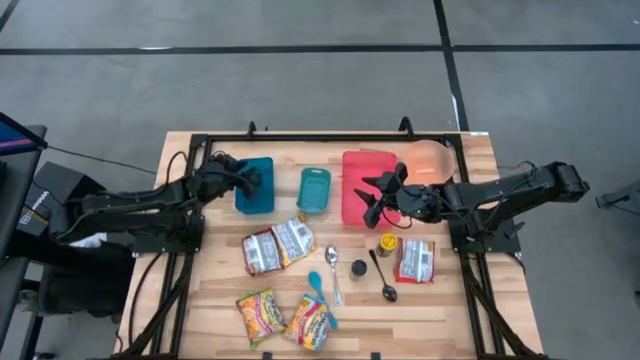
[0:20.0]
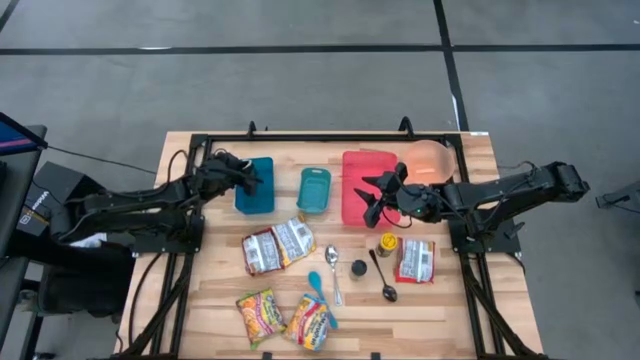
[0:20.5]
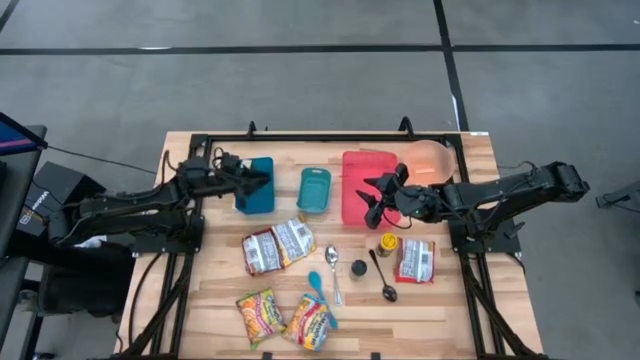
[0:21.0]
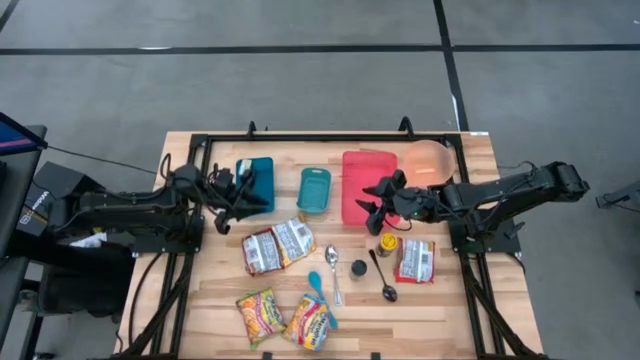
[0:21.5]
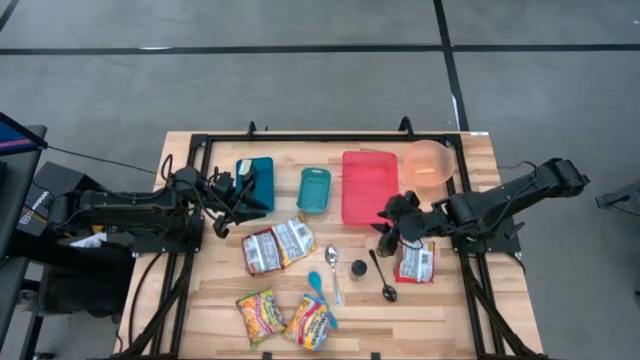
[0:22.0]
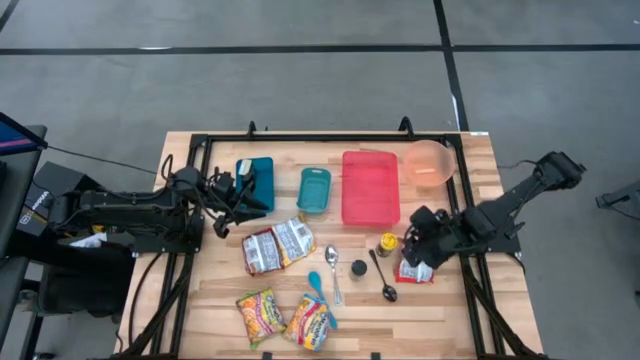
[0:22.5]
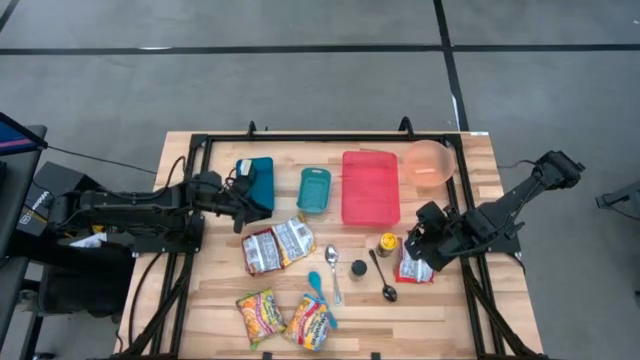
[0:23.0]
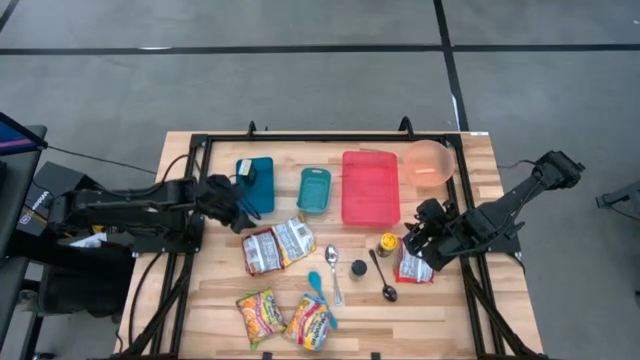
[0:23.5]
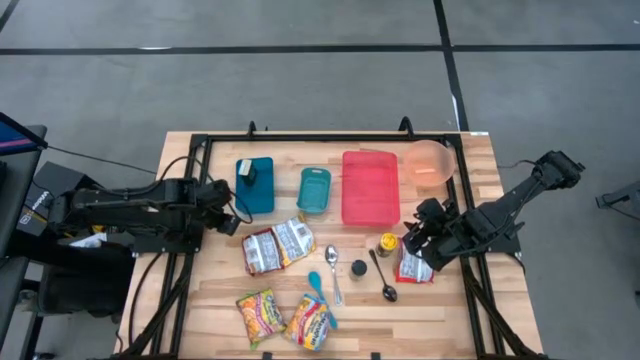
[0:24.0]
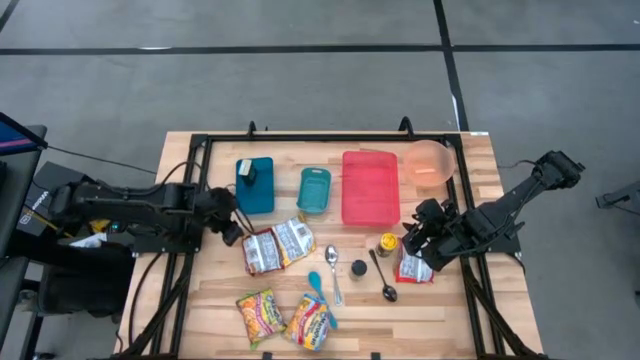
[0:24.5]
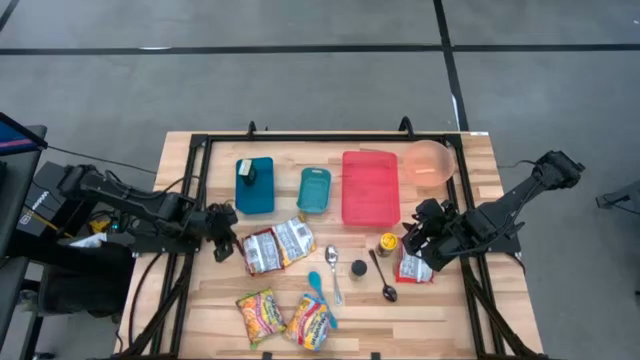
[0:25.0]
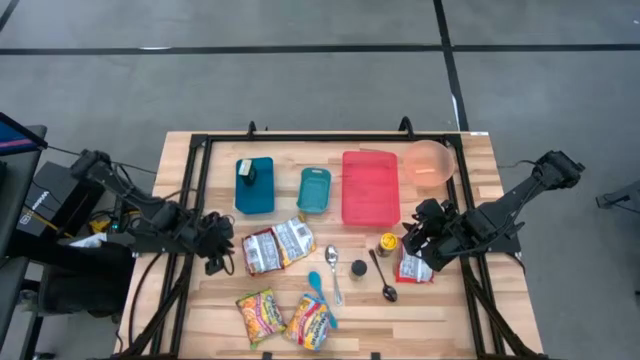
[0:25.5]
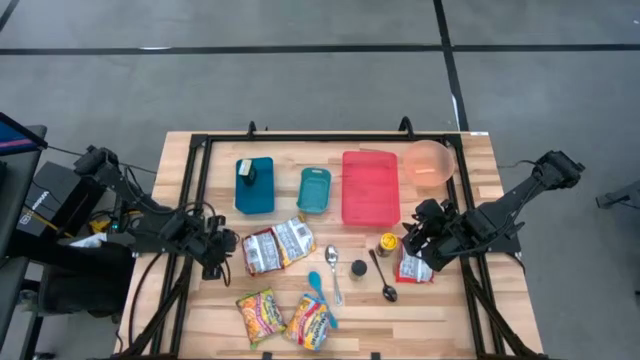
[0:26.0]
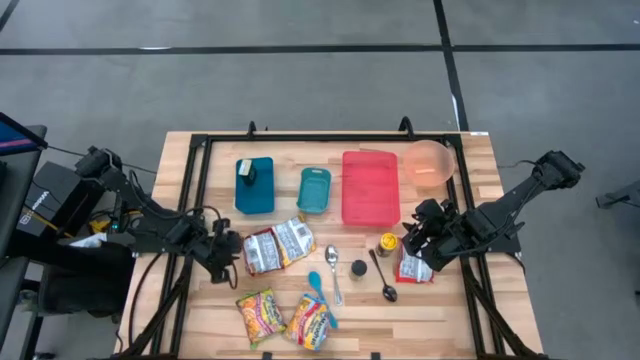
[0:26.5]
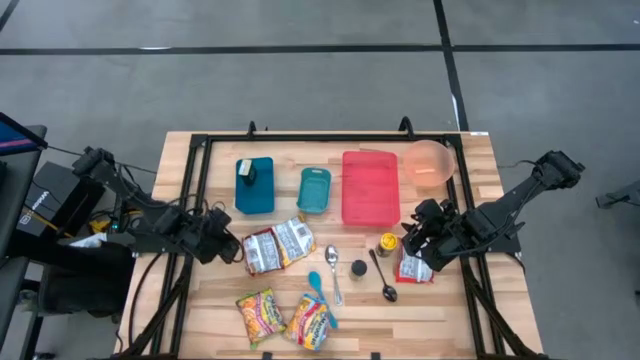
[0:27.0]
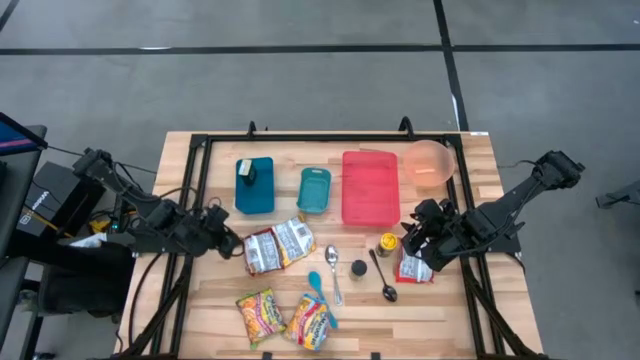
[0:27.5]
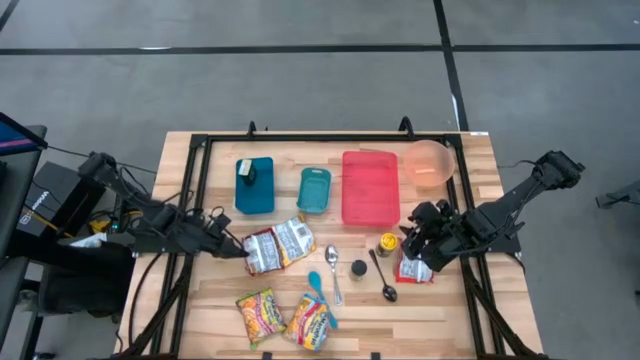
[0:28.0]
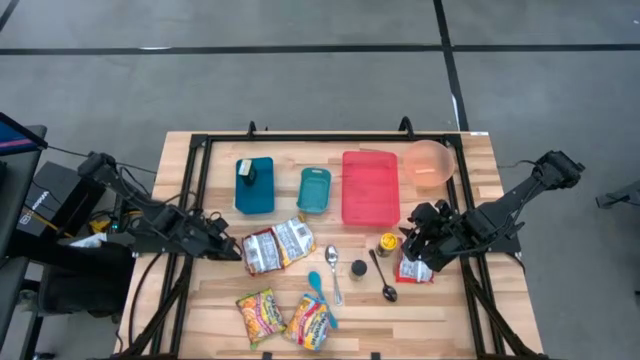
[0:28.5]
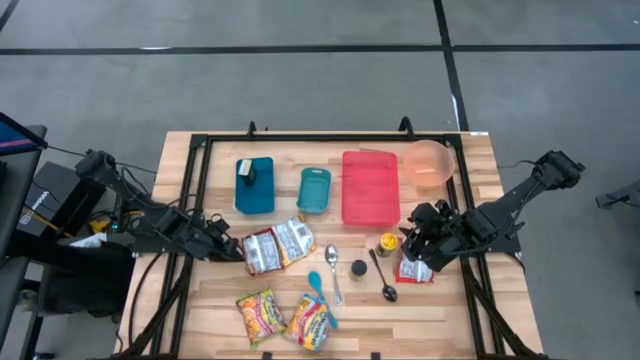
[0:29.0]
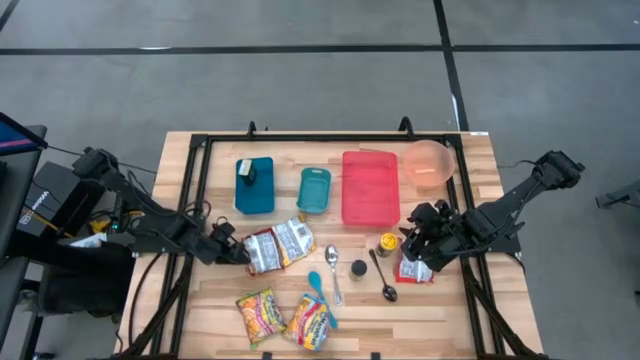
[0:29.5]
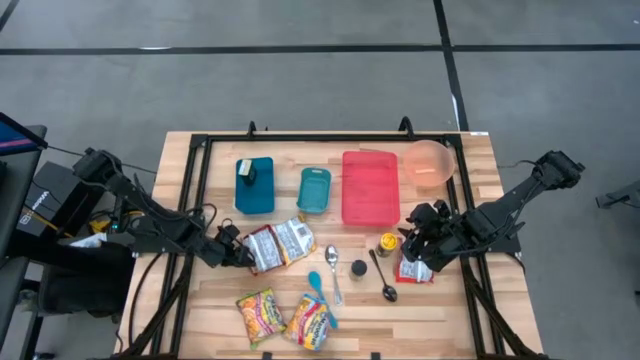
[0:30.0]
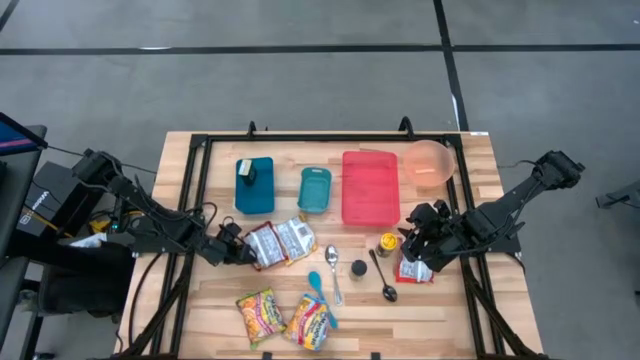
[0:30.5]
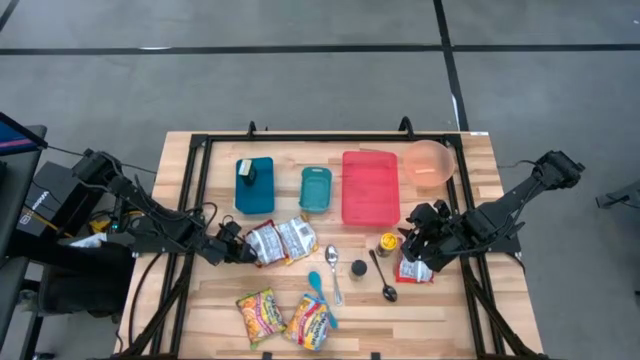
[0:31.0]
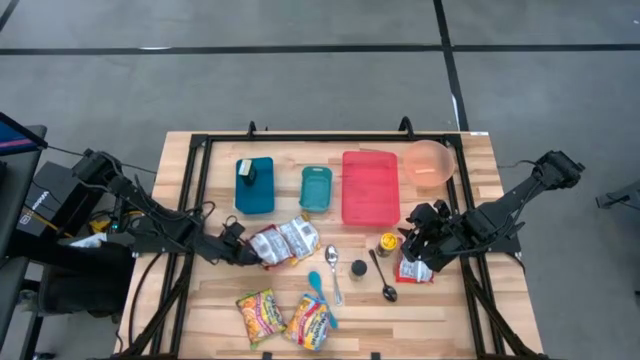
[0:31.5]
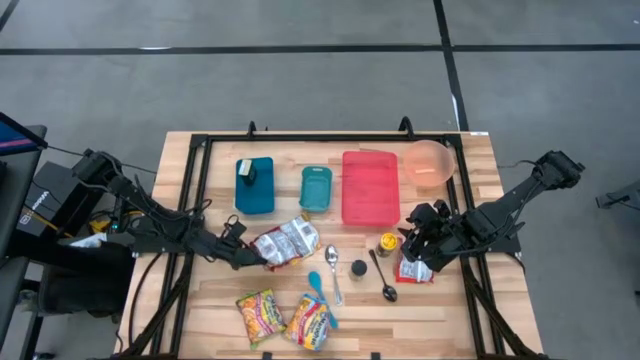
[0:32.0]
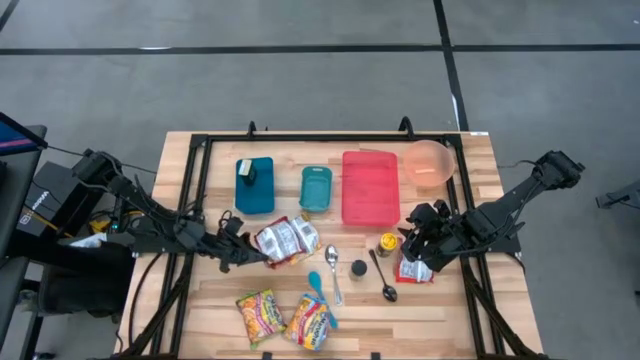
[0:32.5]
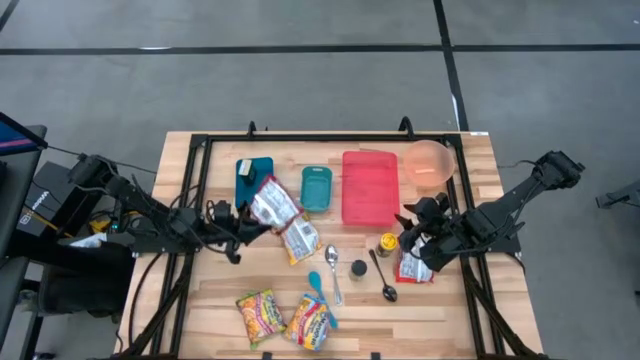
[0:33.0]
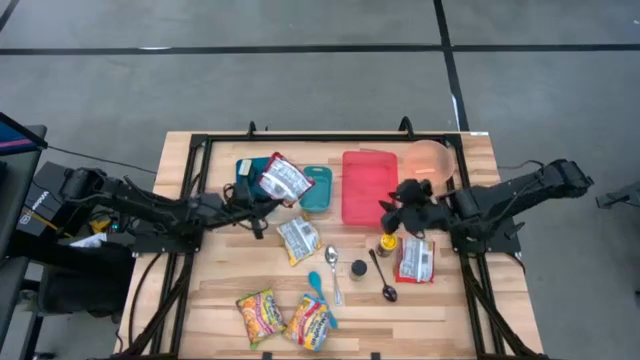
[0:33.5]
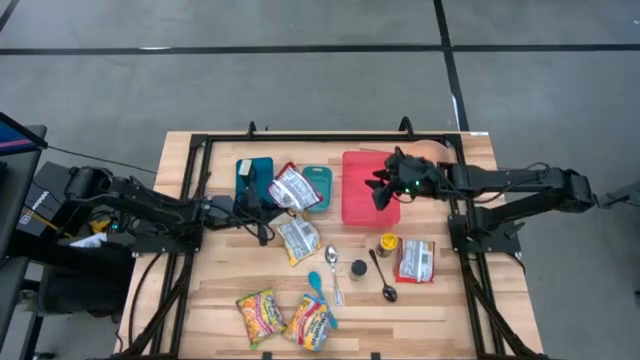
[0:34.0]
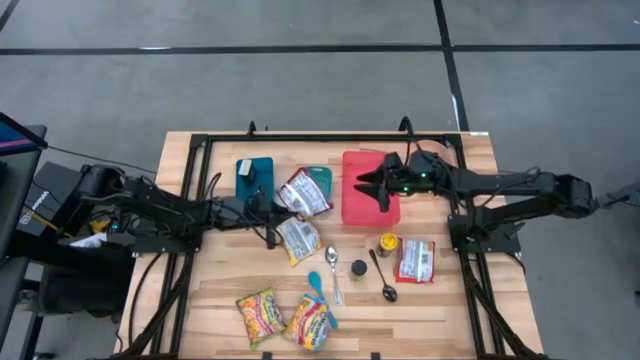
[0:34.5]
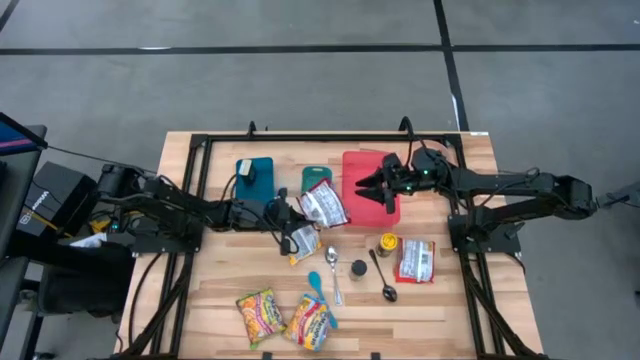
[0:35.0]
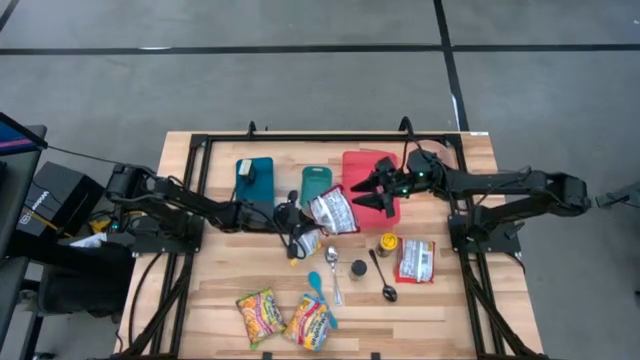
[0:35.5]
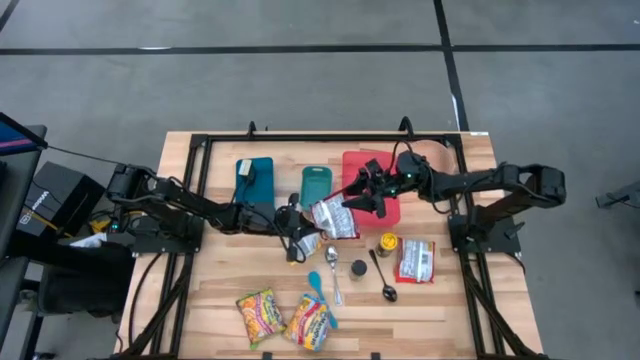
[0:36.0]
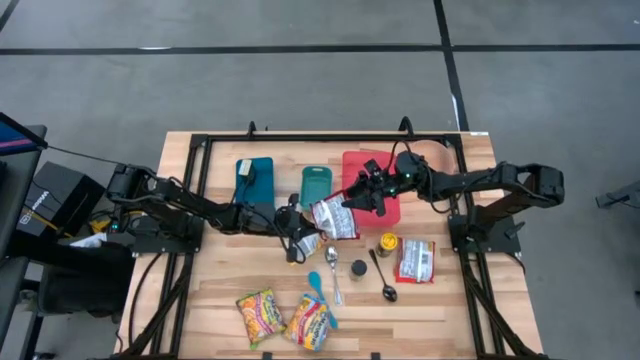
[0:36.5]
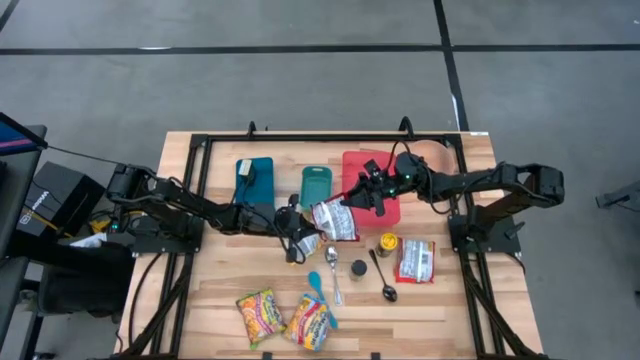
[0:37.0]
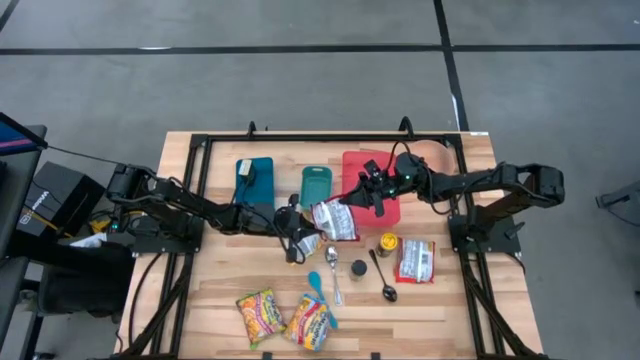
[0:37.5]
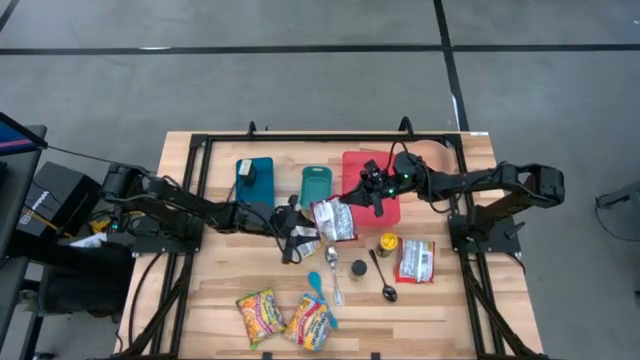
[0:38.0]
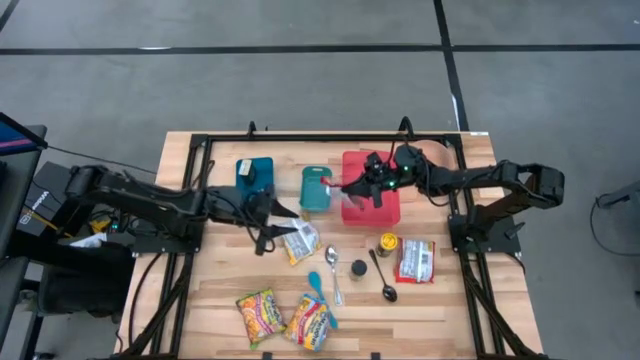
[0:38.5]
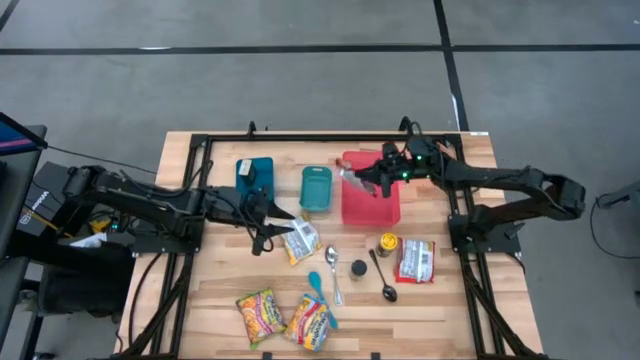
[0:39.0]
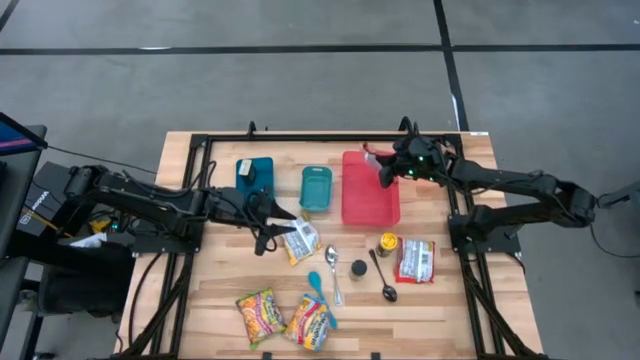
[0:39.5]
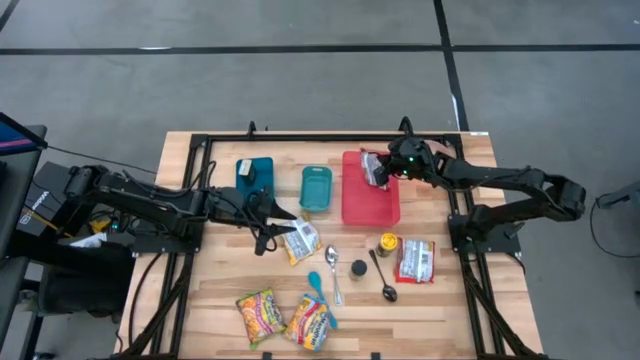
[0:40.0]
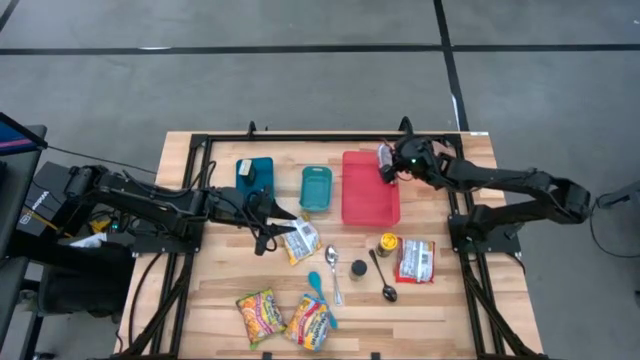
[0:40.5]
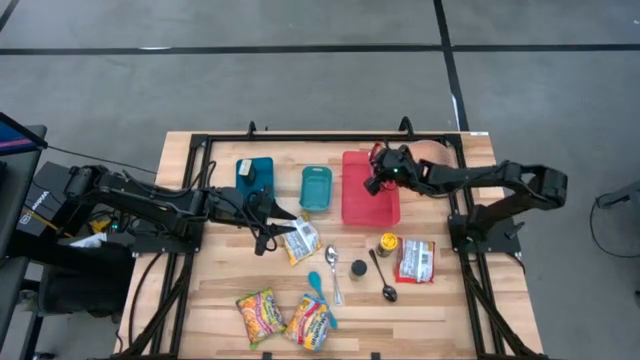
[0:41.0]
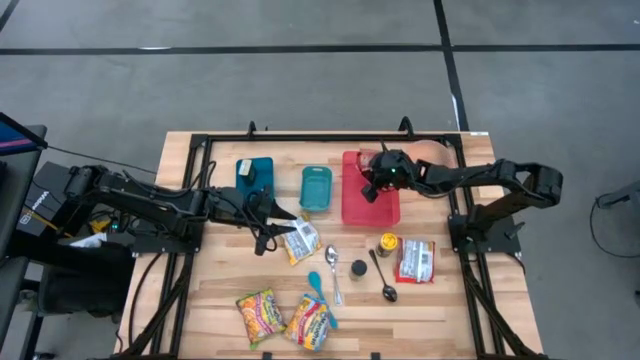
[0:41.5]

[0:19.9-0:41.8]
Task: Pick & Place Food Item
Put the red noodle pack into the red bin

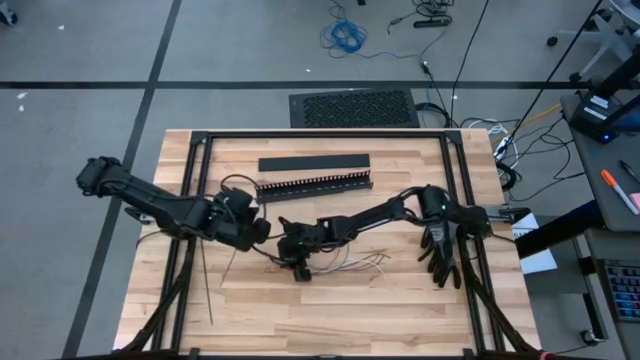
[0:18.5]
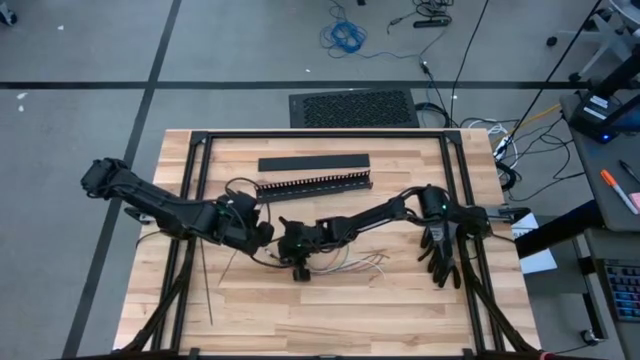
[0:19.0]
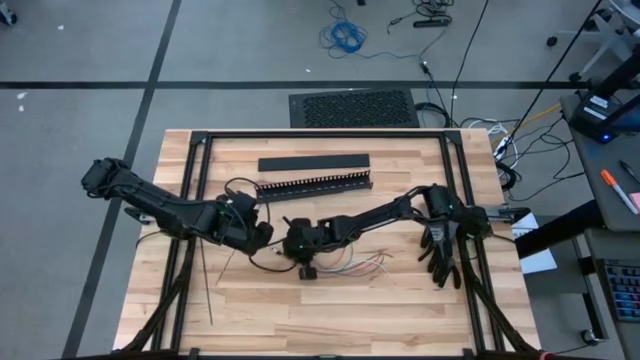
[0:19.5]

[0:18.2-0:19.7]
Task: Ziptie cables
Wrap the cable wires with the black zip tie
